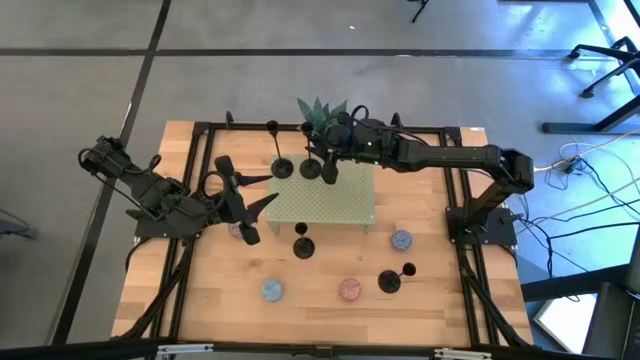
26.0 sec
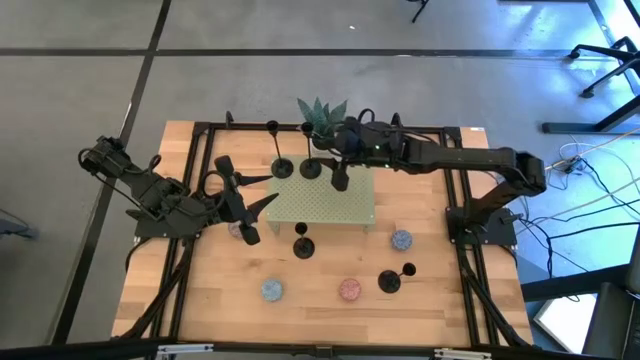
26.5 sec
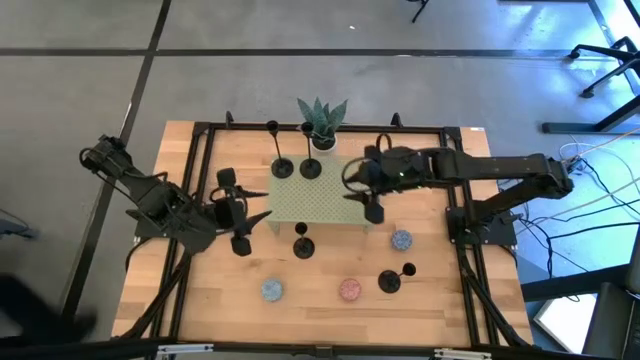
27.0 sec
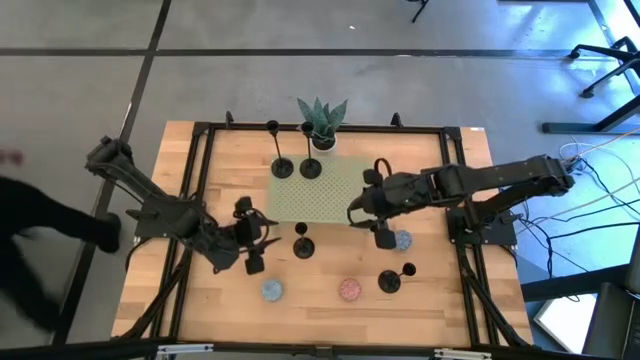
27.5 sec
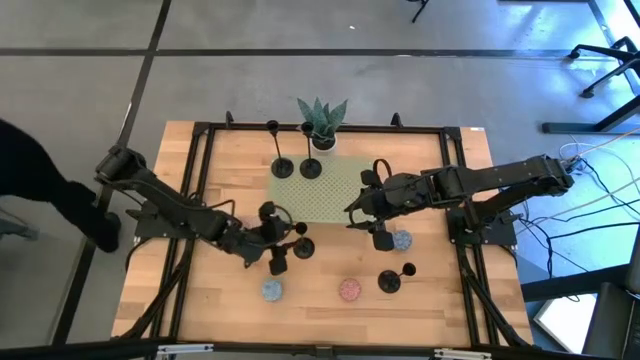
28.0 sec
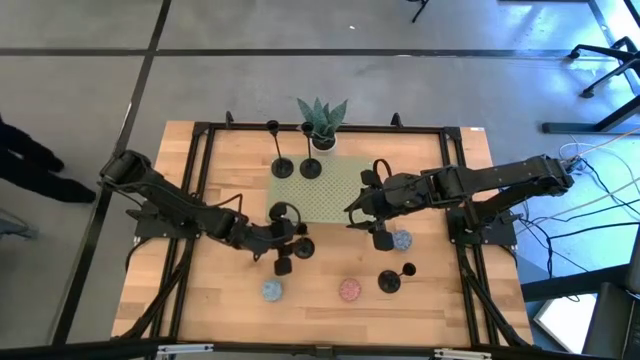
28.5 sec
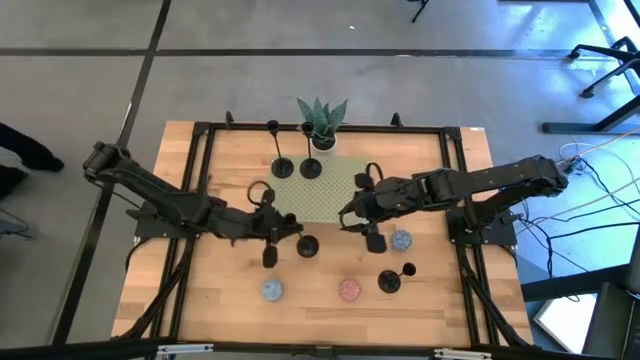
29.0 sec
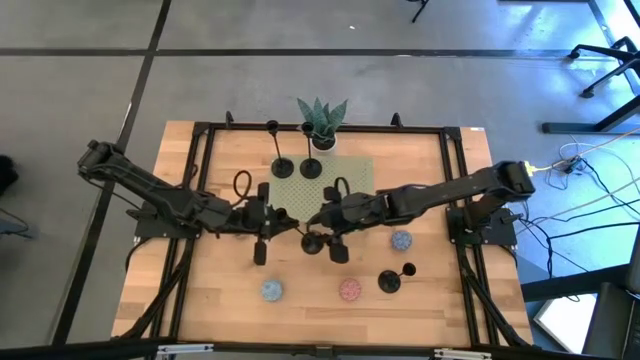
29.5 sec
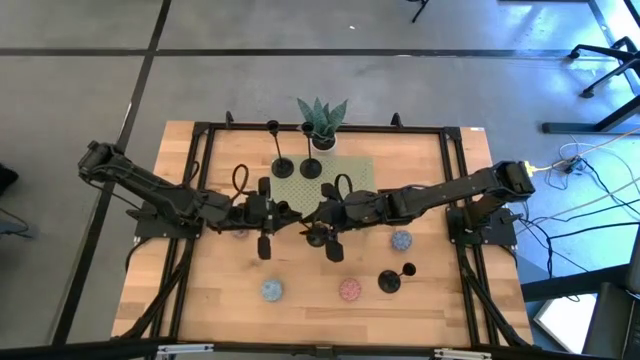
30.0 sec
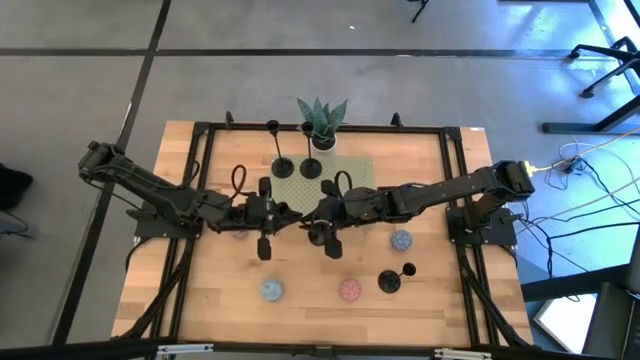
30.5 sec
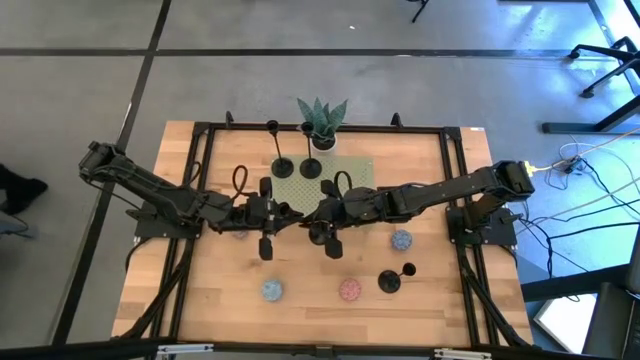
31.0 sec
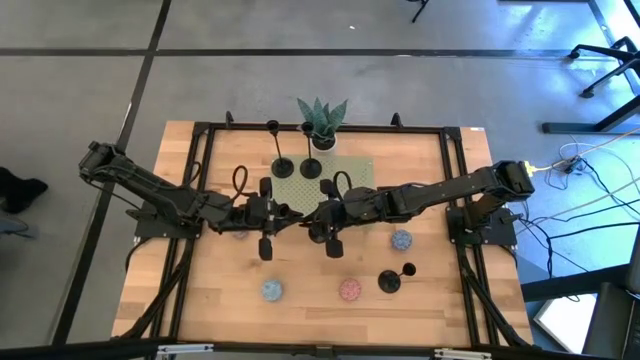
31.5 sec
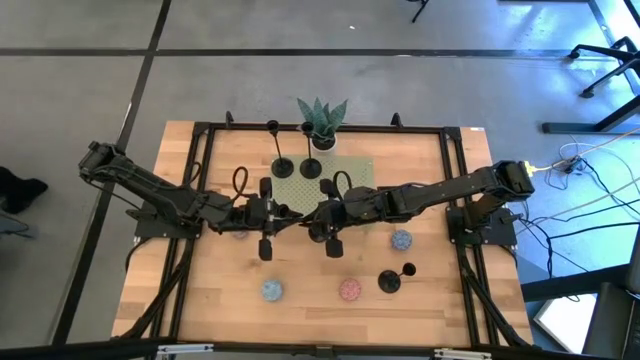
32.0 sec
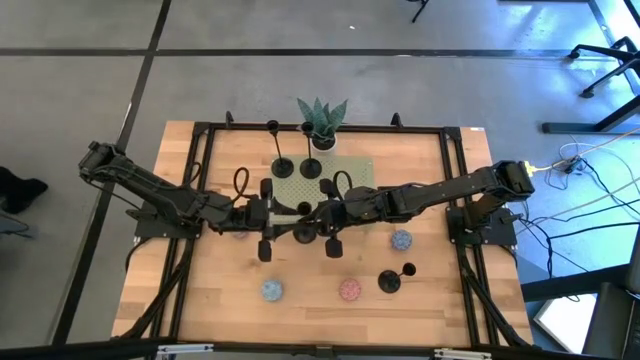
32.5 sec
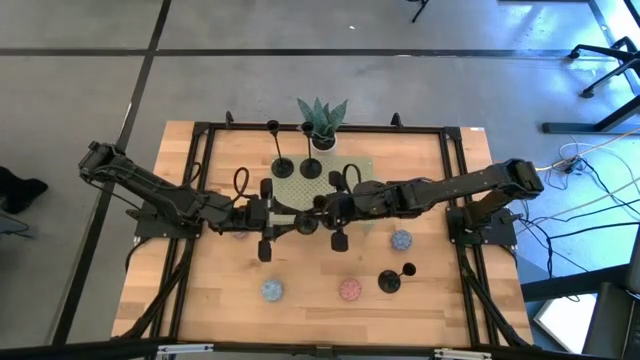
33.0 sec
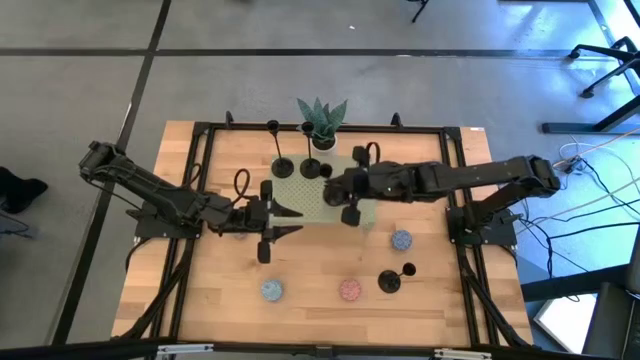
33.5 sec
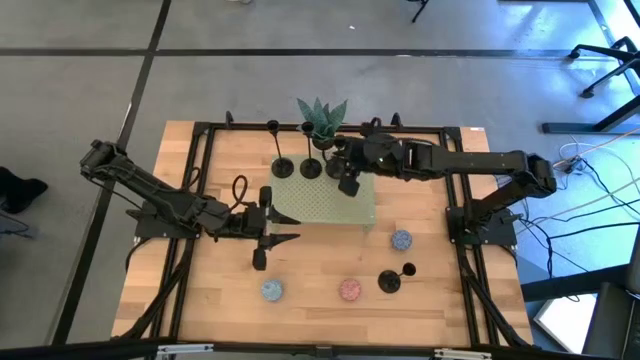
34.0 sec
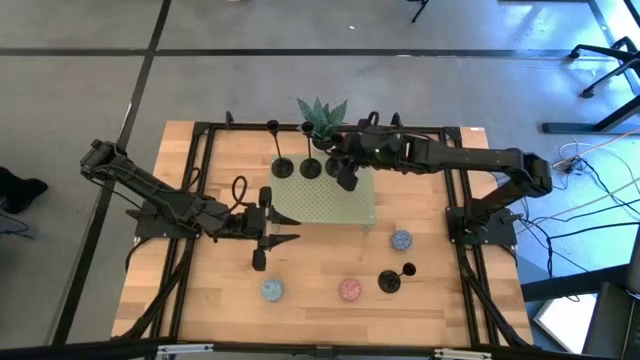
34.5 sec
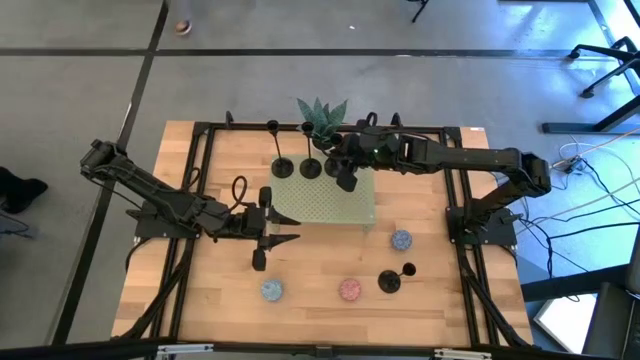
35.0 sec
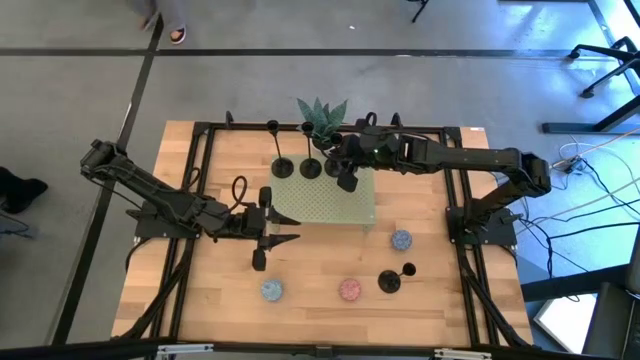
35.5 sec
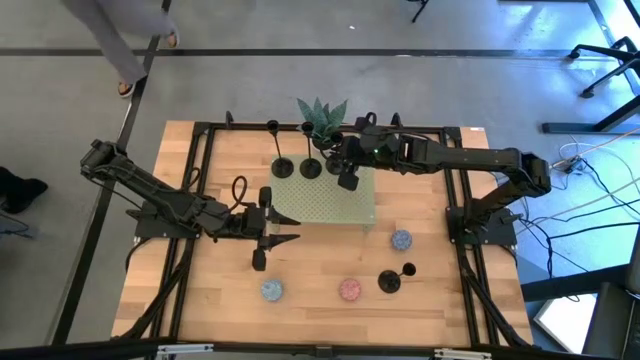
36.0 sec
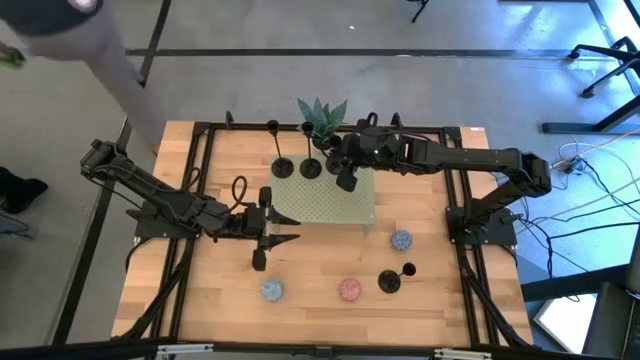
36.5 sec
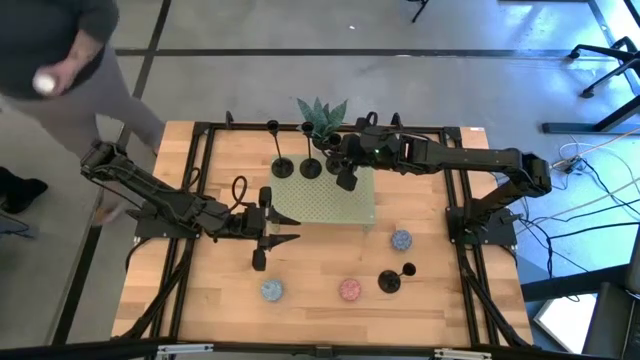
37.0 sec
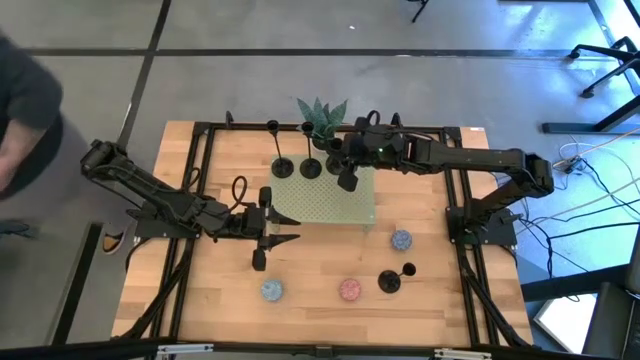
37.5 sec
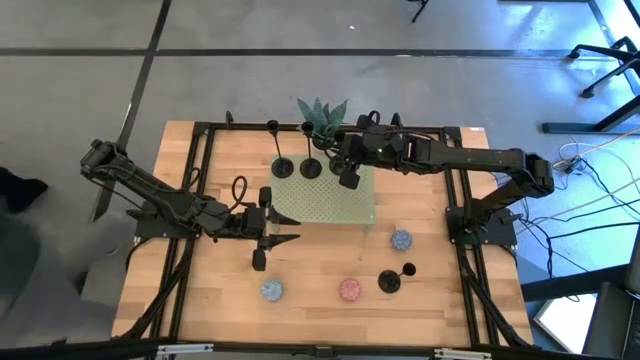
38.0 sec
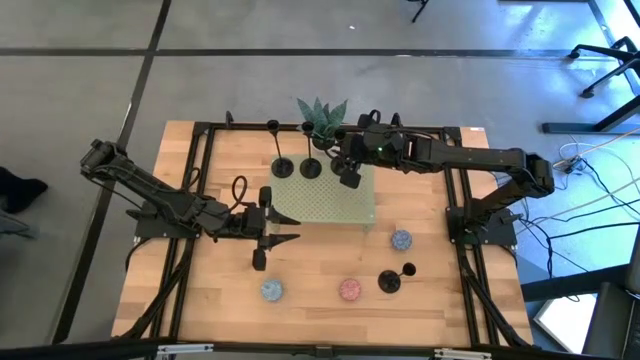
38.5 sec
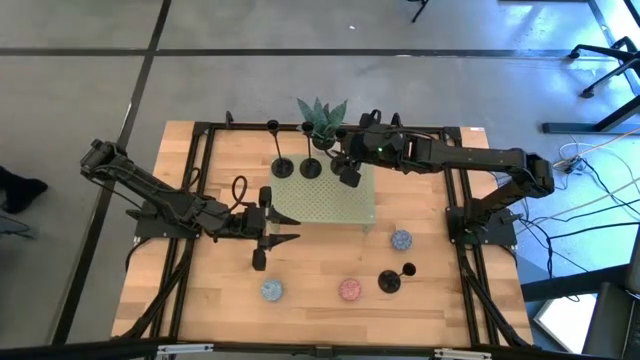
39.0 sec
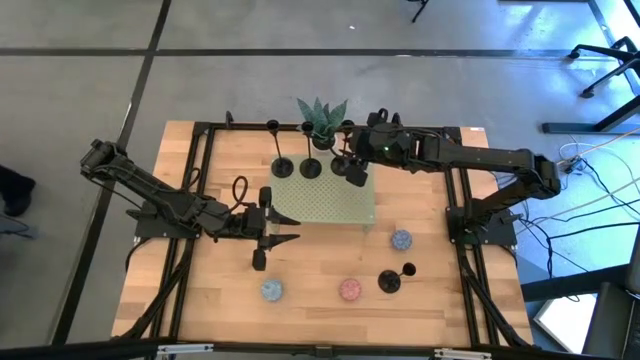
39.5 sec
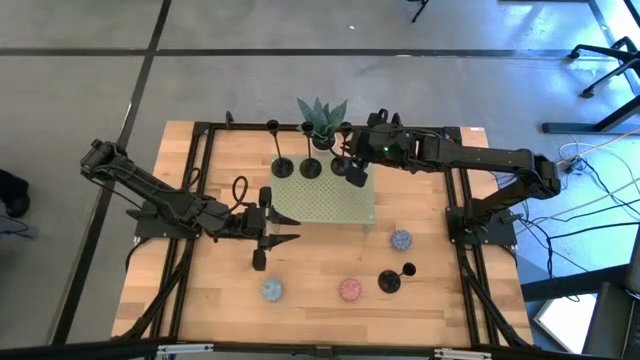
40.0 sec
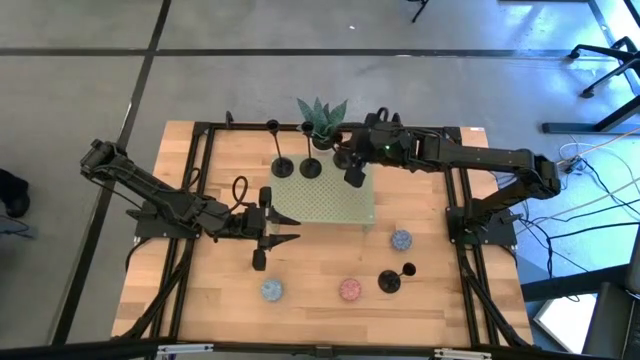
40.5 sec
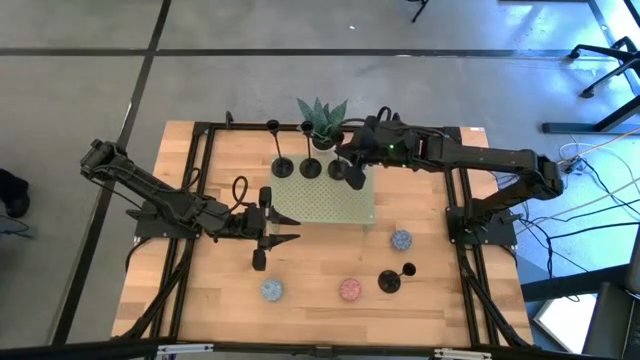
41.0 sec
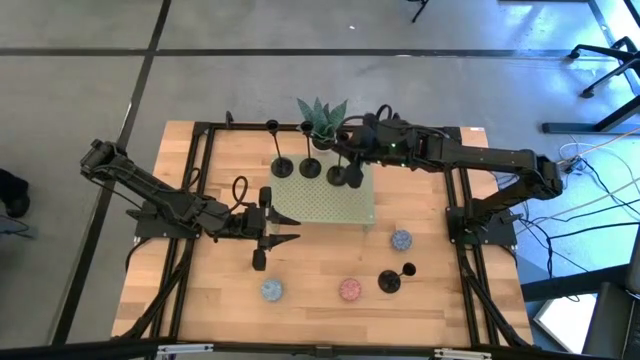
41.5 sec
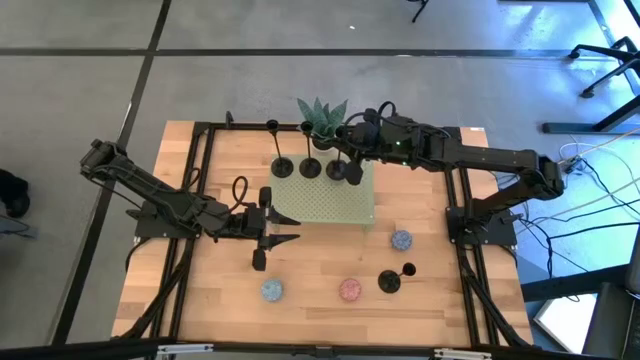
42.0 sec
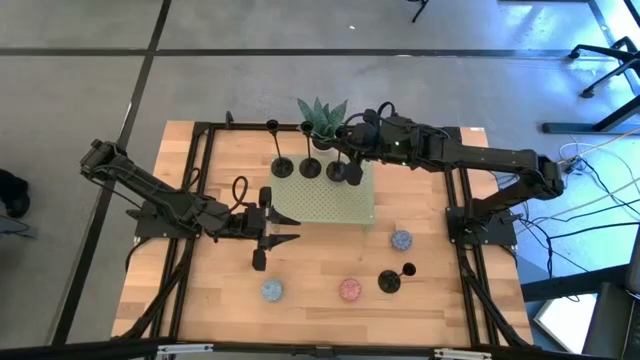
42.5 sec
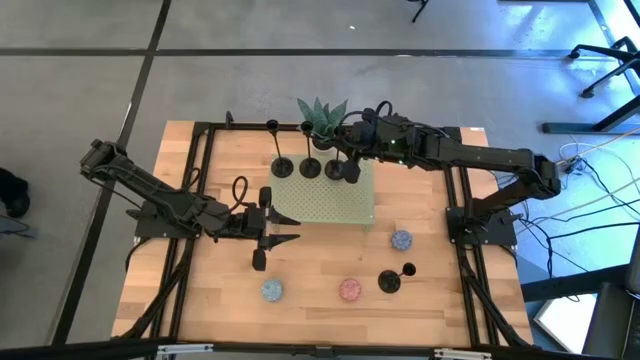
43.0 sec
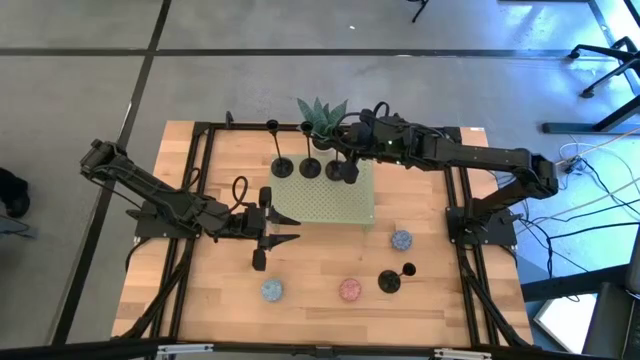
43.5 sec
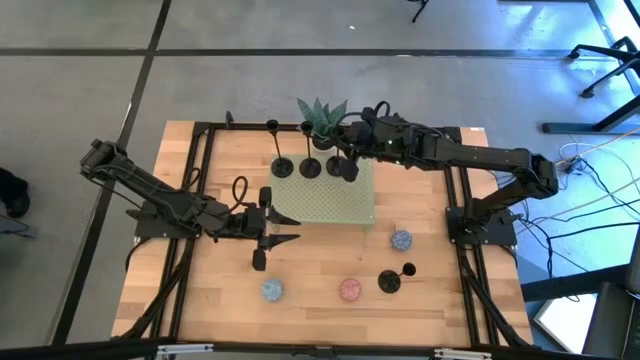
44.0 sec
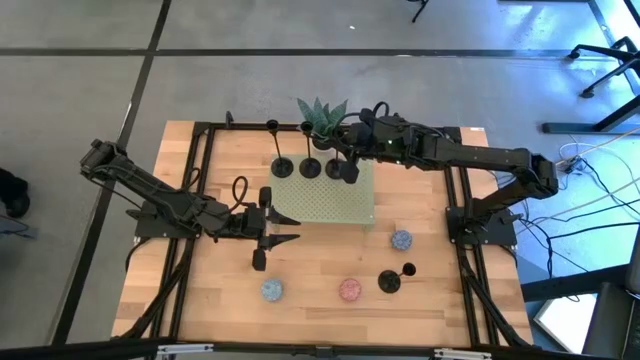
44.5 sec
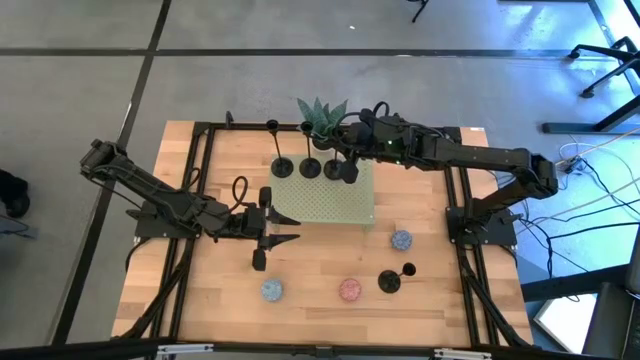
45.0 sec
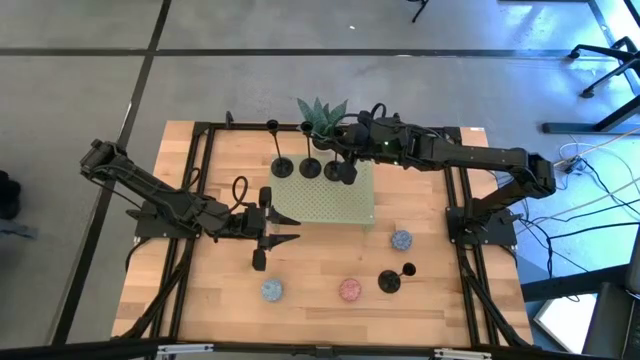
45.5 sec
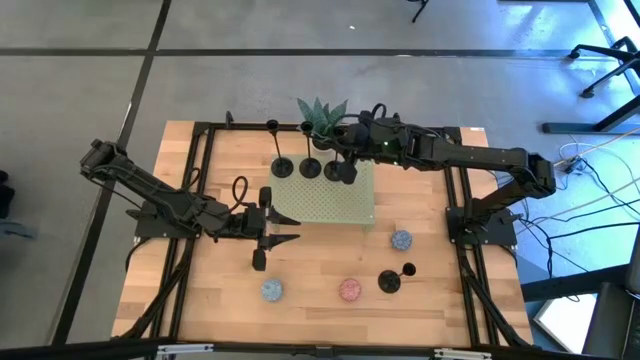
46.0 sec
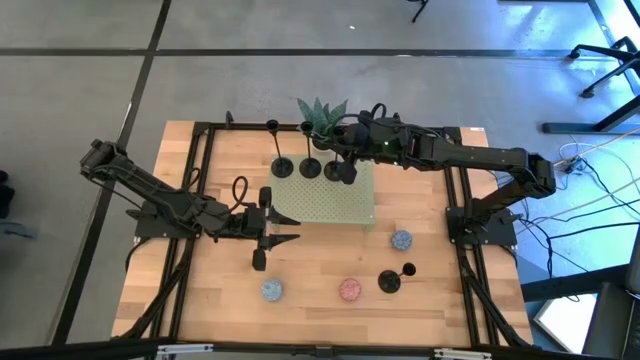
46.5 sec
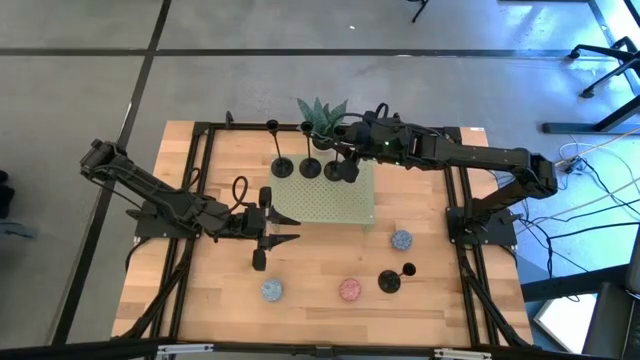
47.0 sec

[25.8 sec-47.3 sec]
Task: Pick & Place candle stick holders
Put the black candle holder on the shelf
